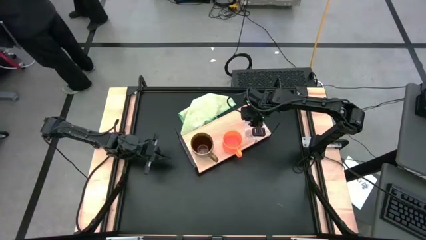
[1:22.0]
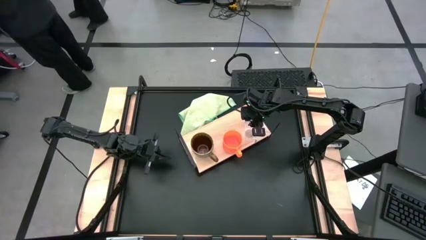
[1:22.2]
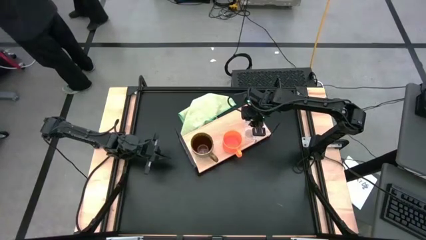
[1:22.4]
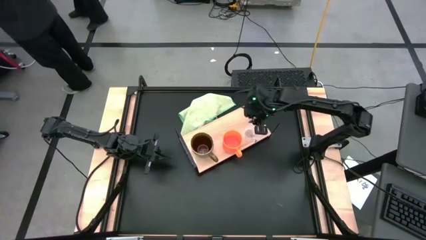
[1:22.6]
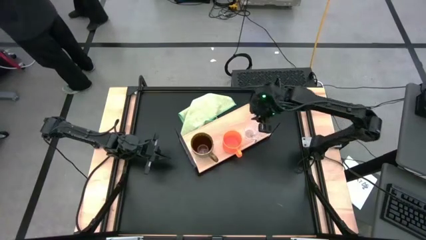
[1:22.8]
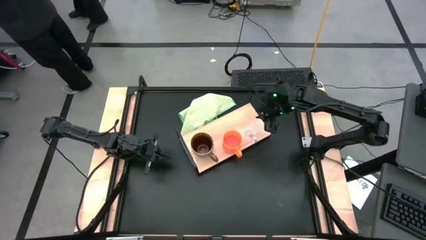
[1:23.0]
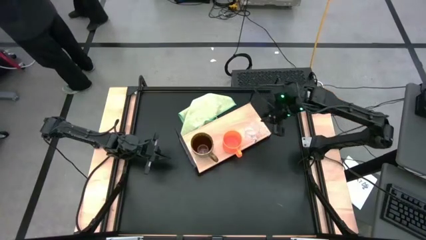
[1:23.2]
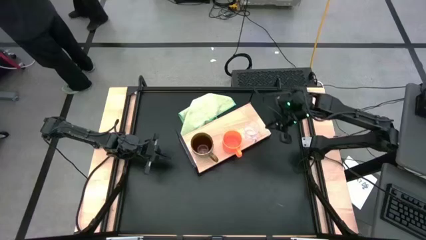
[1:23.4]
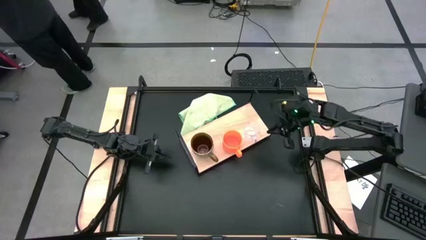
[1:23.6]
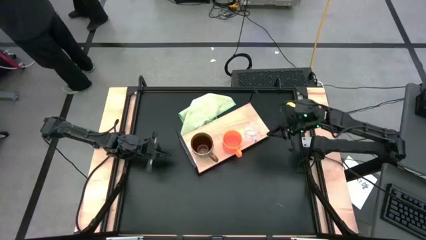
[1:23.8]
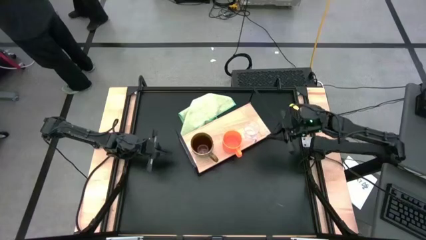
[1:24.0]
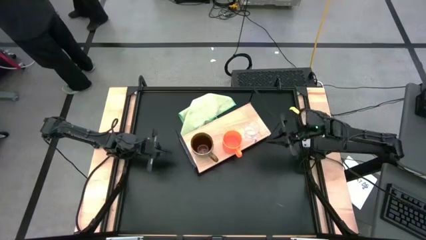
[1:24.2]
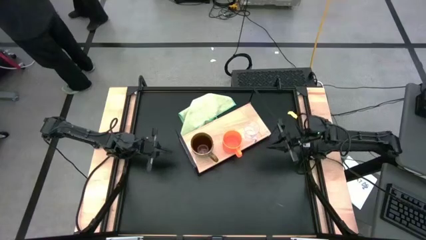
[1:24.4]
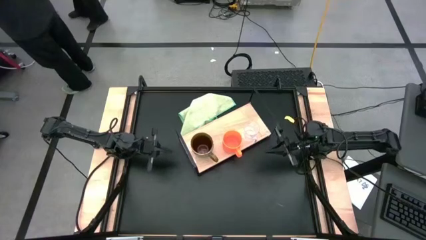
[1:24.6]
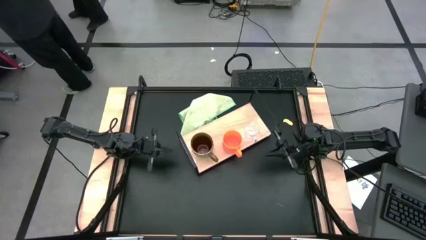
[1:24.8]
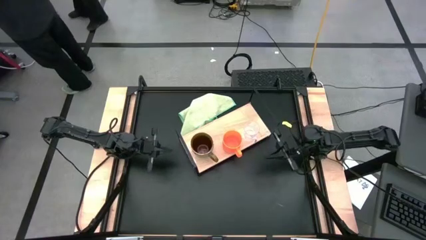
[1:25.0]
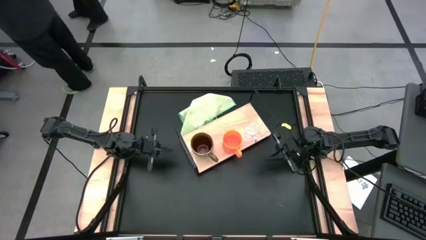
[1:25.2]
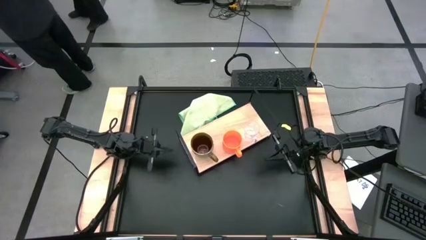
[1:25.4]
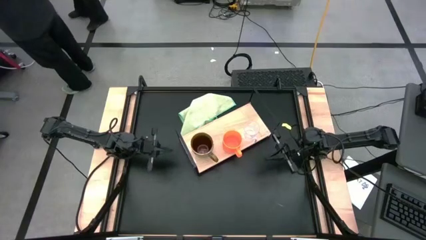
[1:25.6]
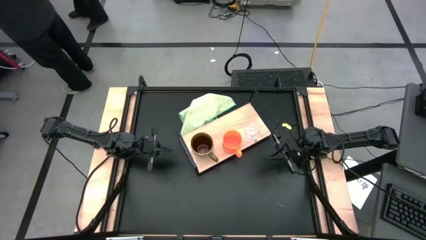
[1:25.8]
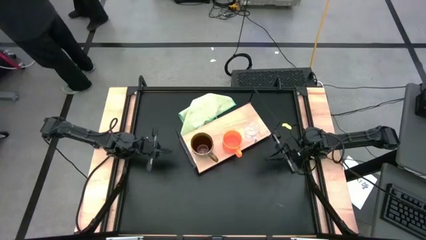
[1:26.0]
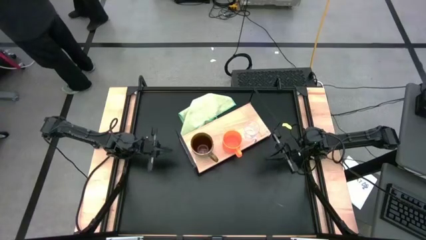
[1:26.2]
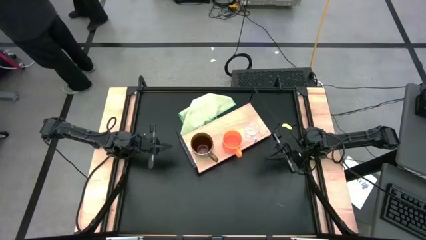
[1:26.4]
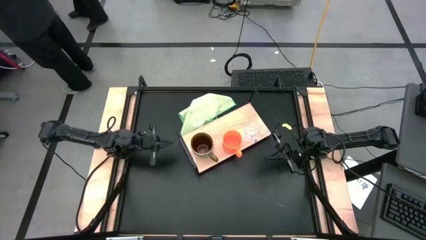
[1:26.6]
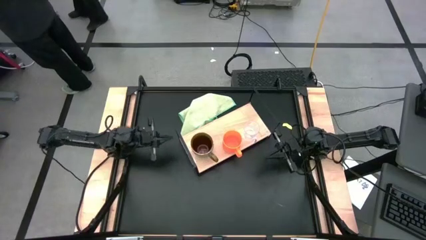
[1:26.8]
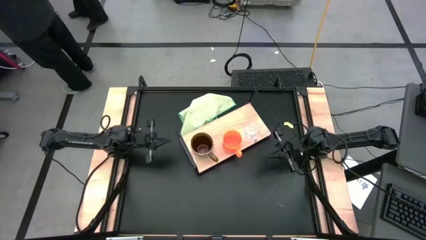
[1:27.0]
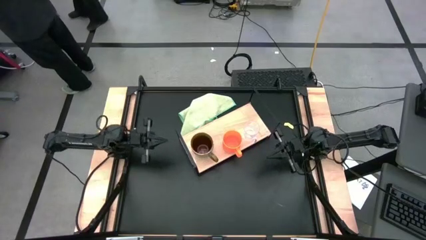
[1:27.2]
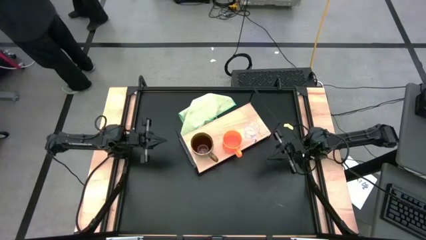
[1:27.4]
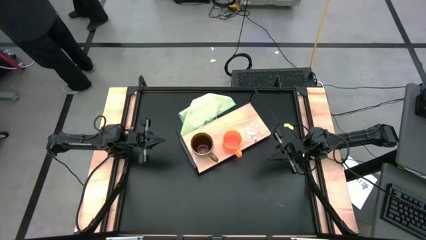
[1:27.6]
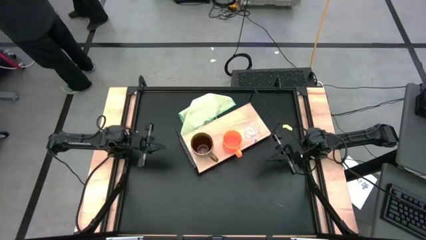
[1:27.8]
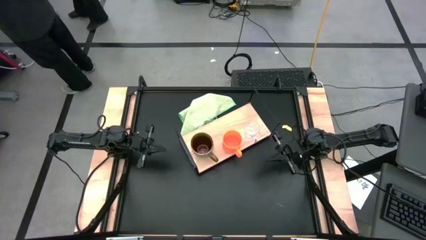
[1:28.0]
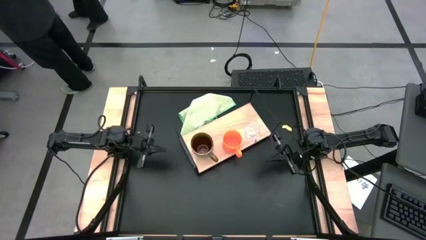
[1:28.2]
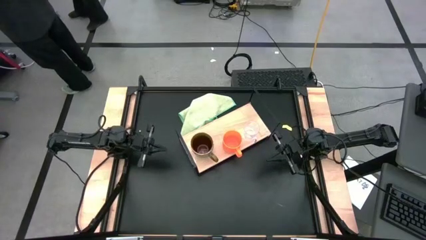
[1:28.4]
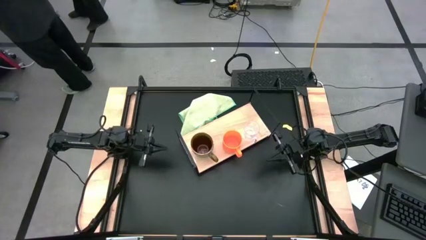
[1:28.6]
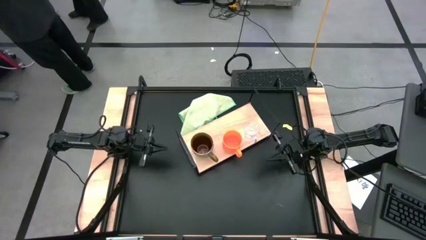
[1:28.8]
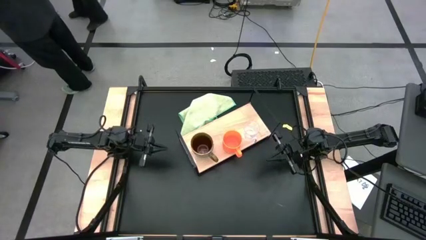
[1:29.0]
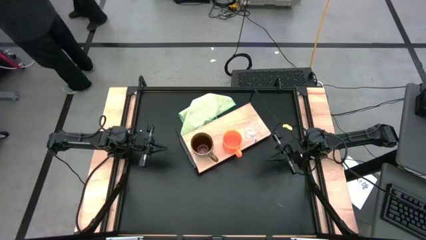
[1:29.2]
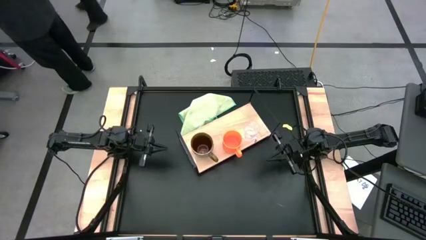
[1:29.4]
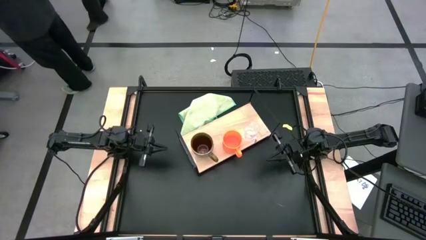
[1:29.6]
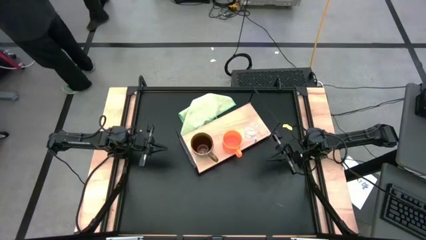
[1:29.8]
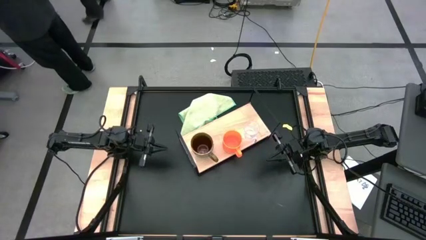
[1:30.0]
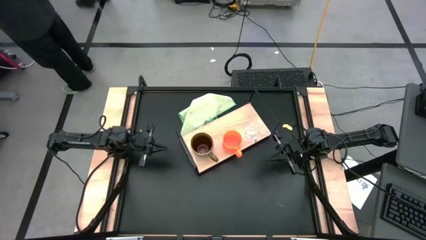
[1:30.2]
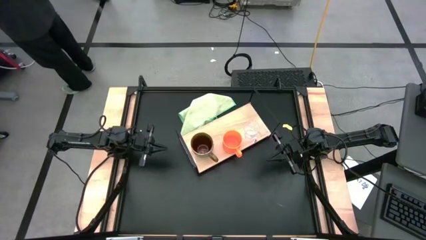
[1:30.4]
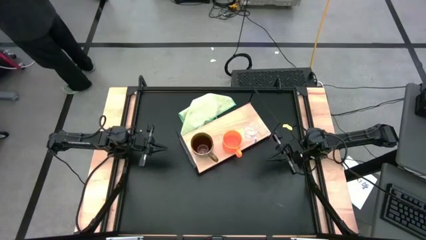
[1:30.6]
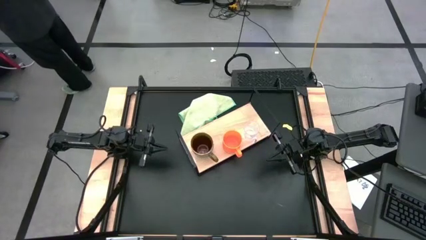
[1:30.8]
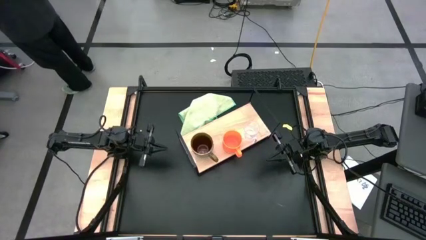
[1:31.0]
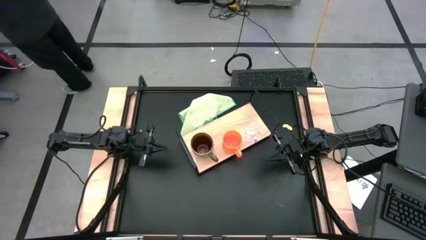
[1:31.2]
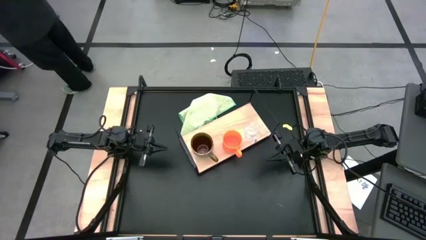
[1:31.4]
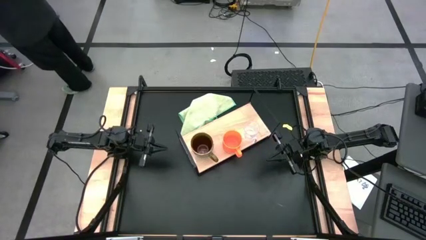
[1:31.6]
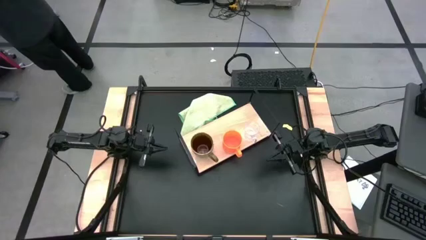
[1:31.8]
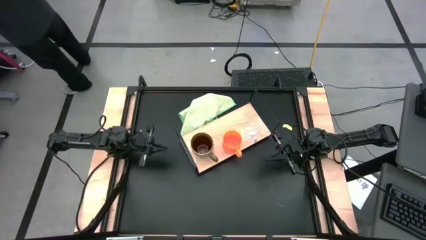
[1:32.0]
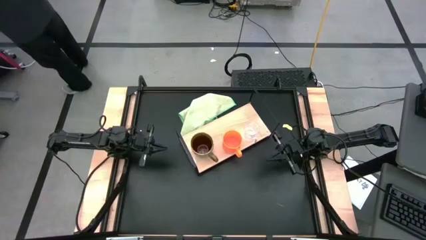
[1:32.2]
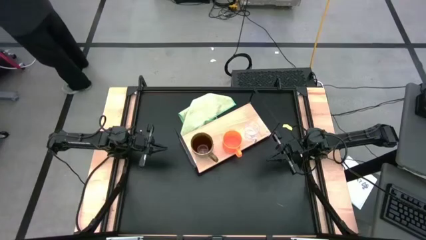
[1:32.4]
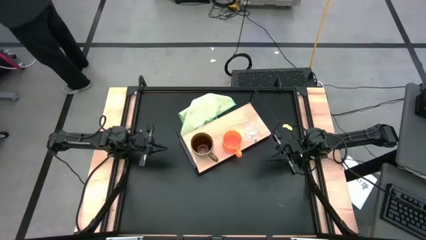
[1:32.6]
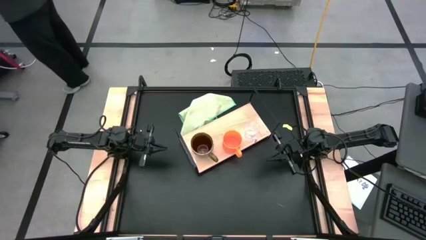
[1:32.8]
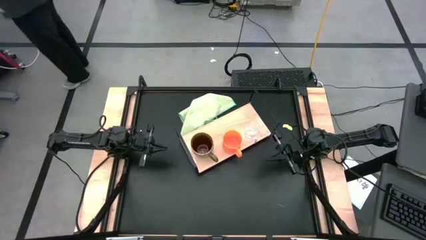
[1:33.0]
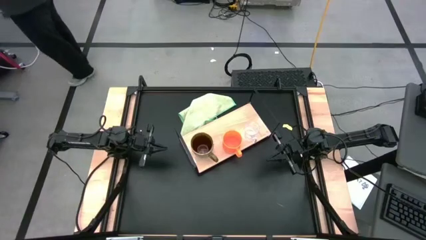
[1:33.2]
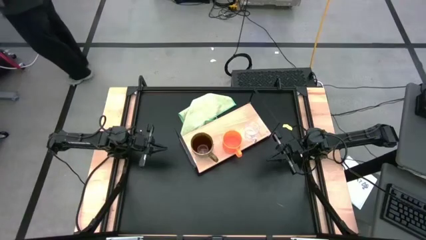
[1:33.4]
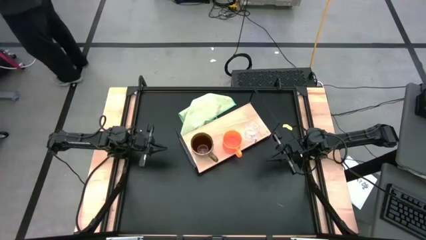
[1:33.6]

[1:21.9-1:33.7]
Task: Stack small to large cups/mugs on shelf
Return to Home Position

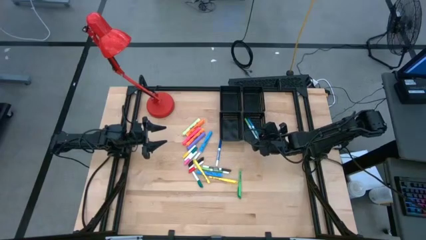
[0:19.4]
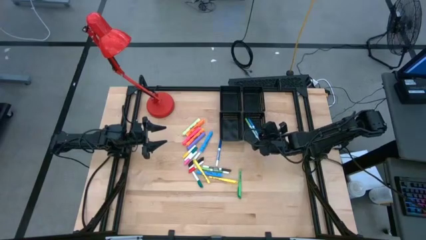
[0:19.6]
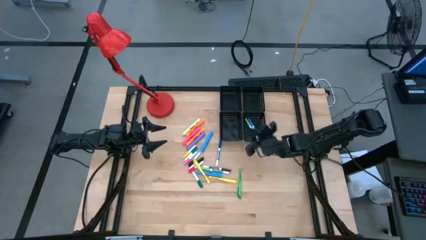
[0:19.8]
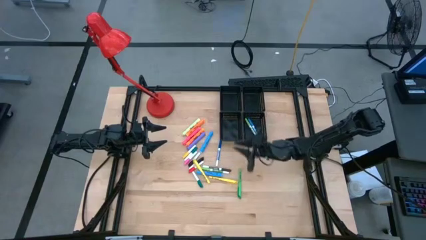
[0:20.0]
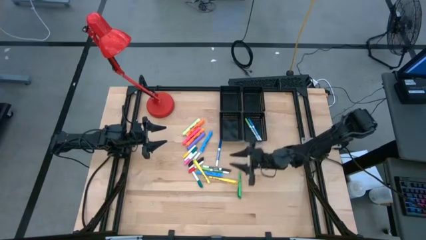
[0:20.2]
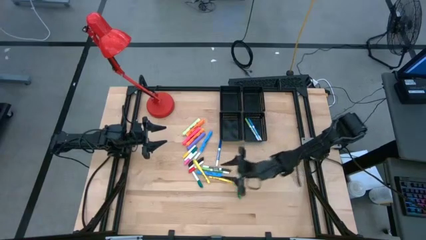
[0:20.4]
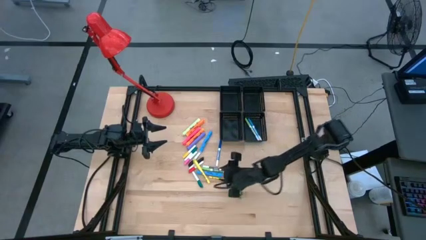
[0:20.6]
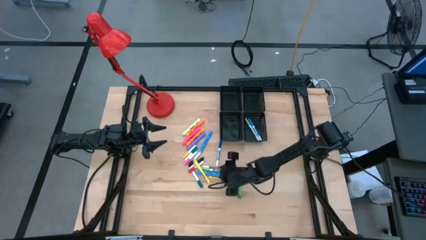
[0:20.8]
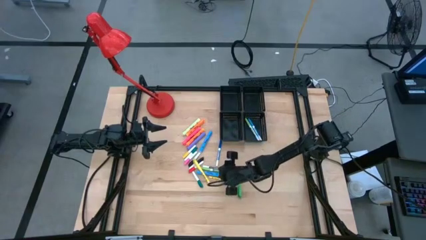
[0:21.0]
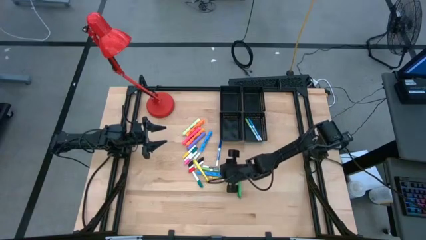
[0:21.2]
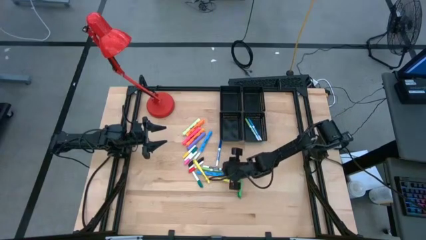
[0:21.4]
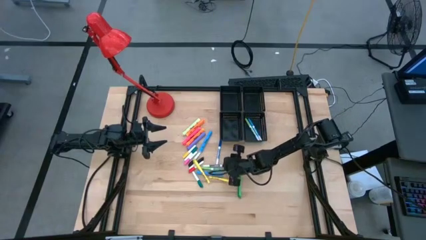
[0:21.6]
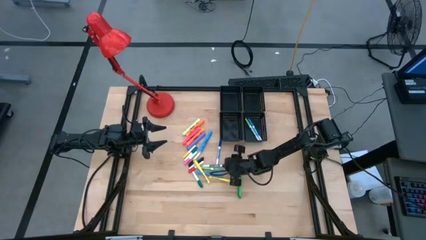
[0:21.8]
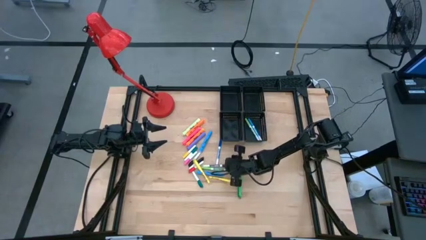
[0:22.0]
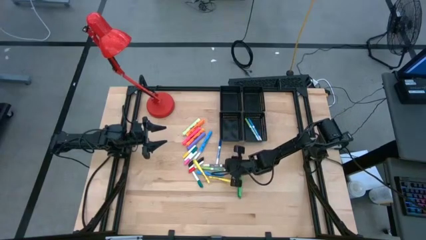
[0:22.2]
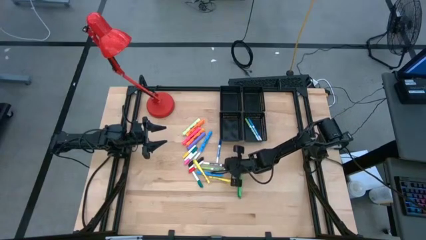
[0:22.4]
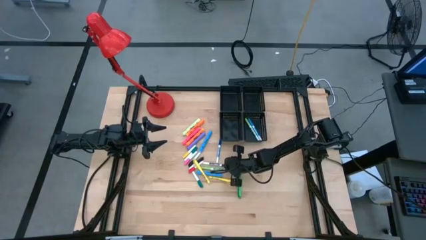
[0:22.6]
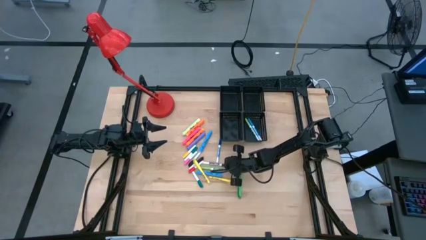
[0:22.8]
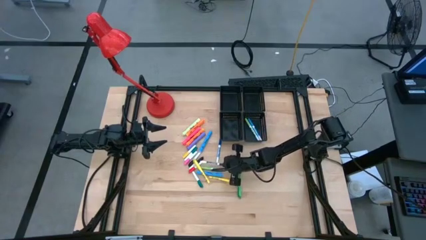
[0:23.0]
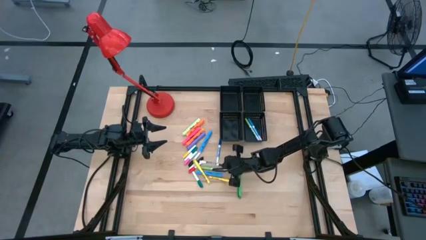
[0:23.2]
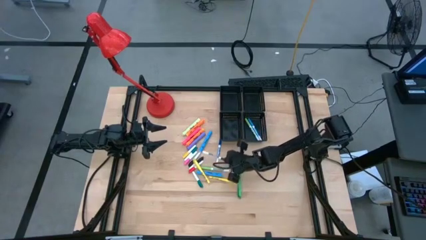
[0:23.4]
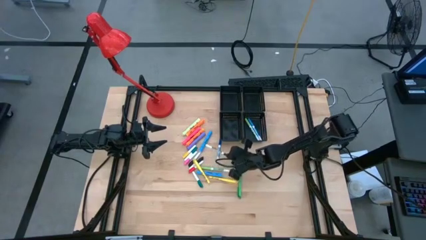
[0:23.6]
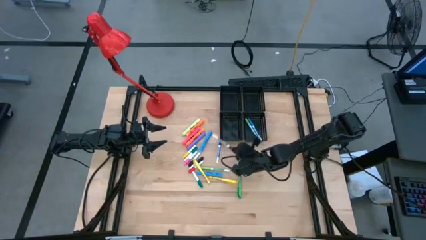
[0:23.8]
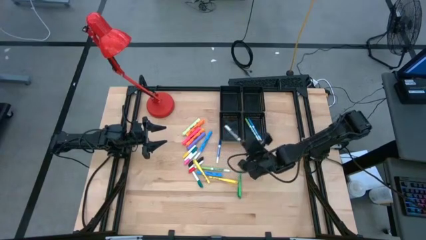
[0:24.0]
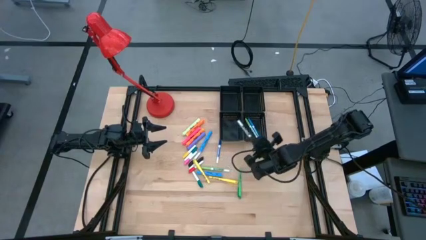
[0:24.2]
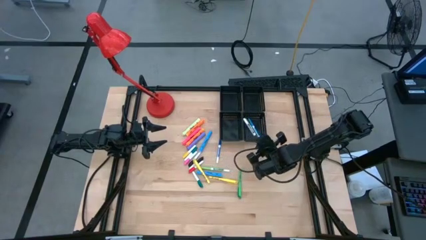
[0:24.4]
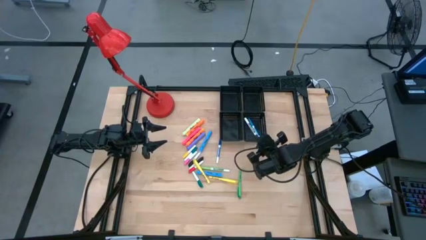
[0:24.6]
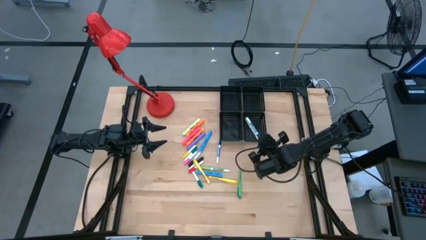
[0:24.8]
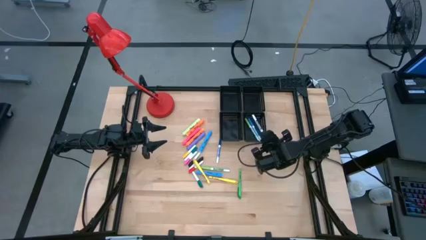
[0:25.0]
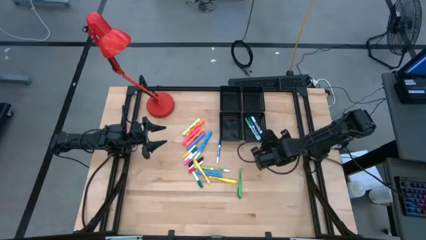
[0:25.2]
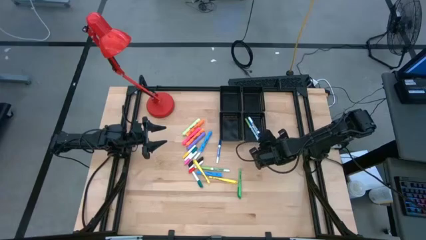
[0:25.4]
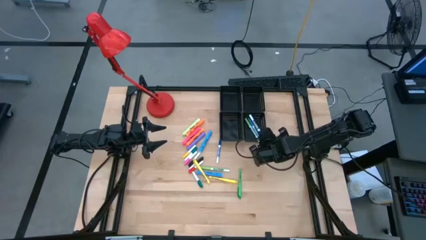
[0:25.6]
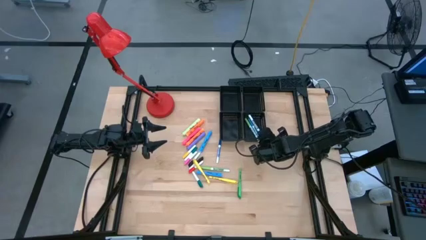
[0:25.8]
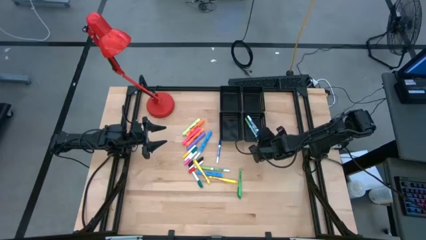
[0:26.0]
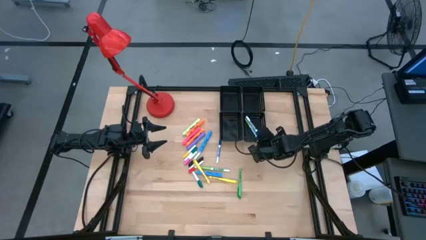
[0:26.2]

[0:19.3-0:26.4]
Task: Pick & Place Markers
Put the brown marker pen into the bottom right black bin
